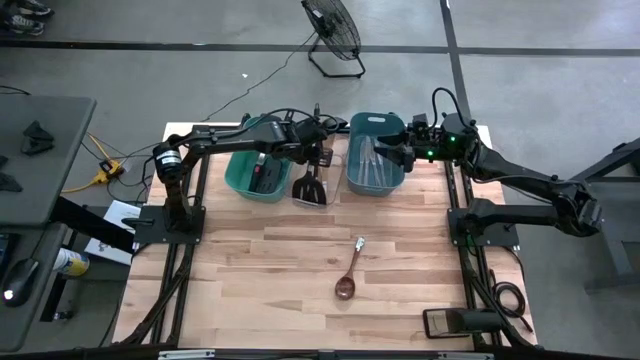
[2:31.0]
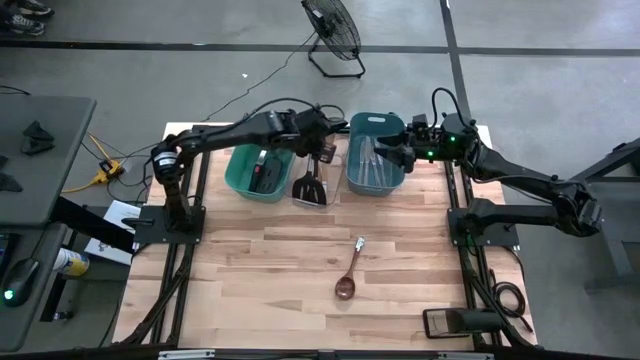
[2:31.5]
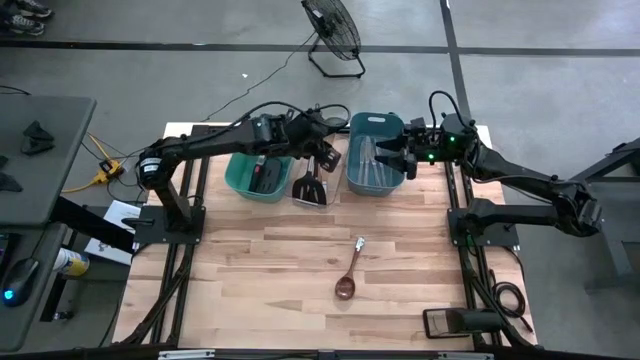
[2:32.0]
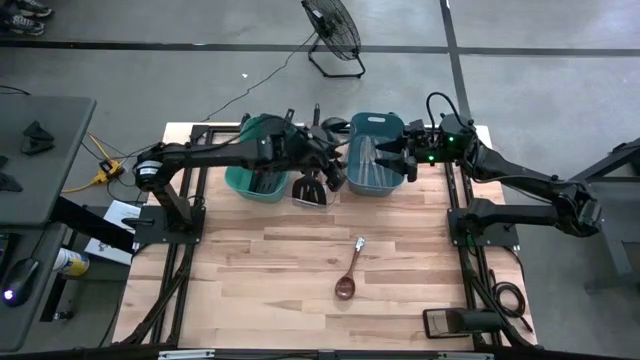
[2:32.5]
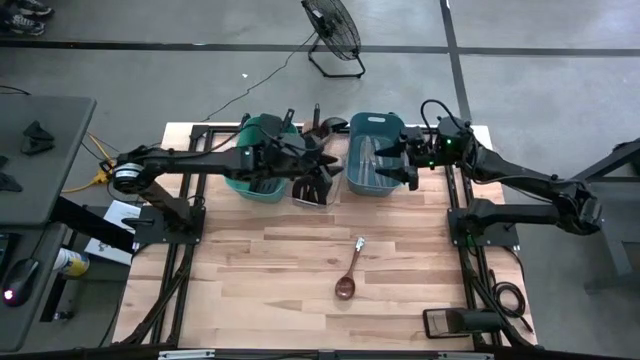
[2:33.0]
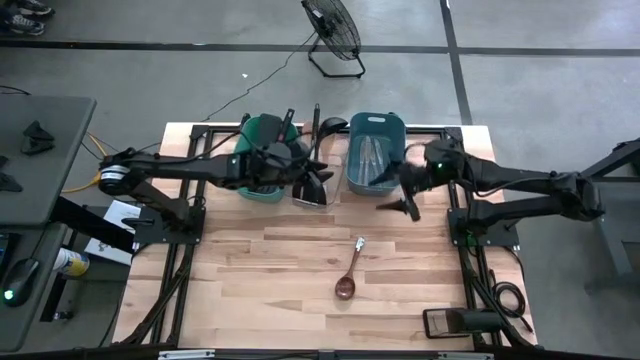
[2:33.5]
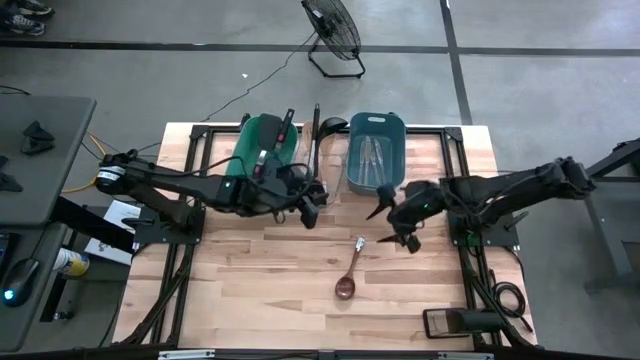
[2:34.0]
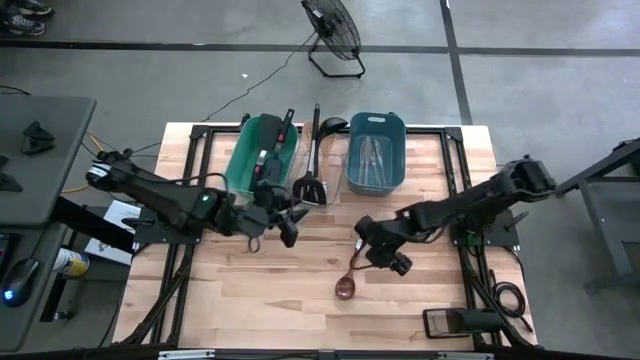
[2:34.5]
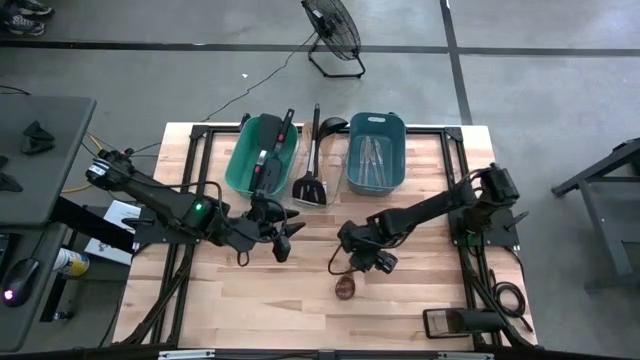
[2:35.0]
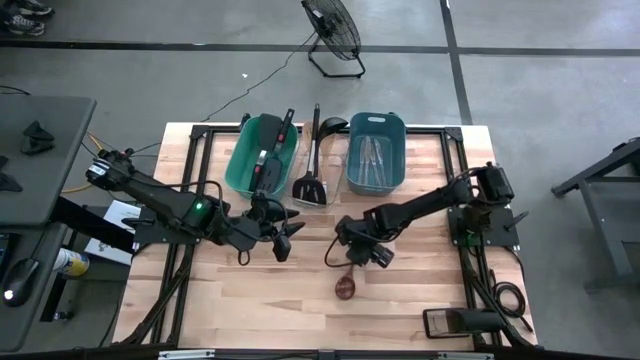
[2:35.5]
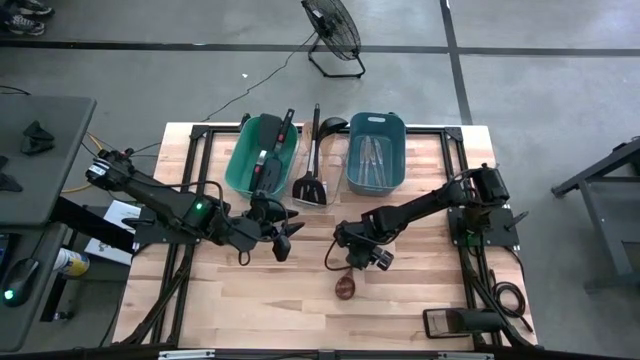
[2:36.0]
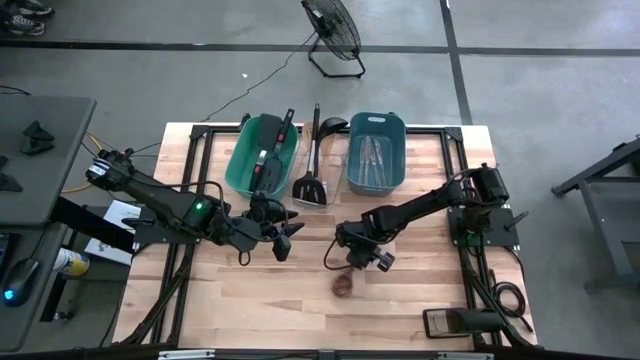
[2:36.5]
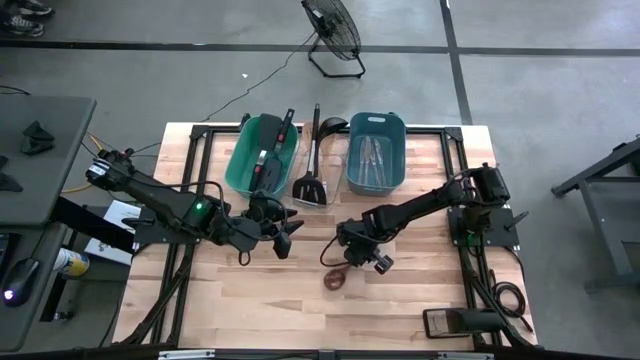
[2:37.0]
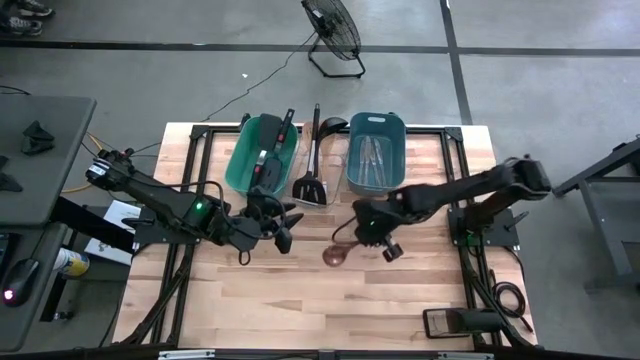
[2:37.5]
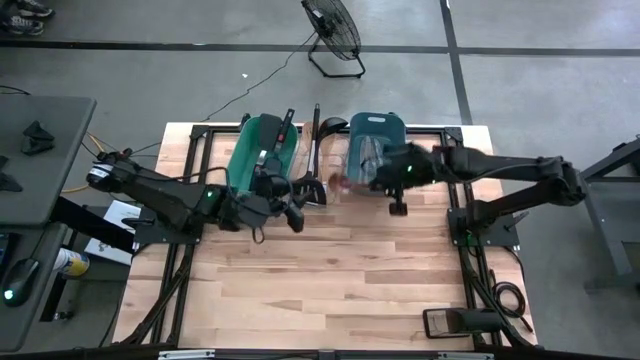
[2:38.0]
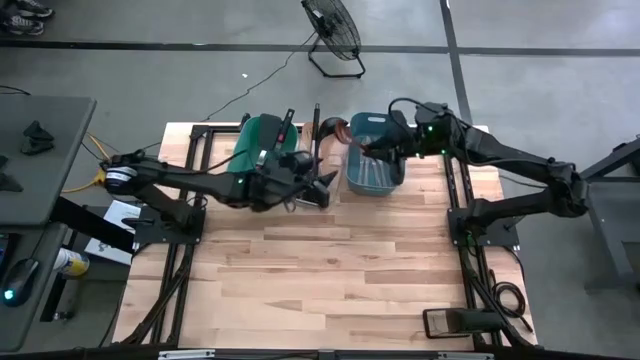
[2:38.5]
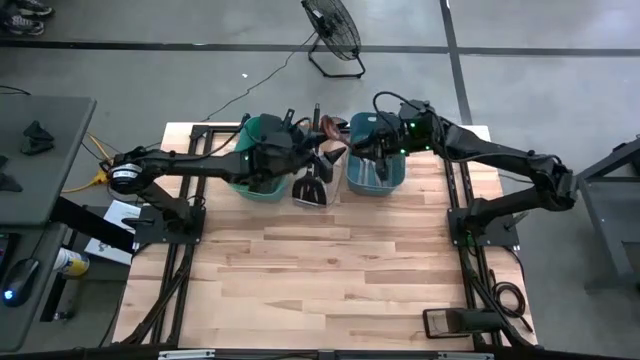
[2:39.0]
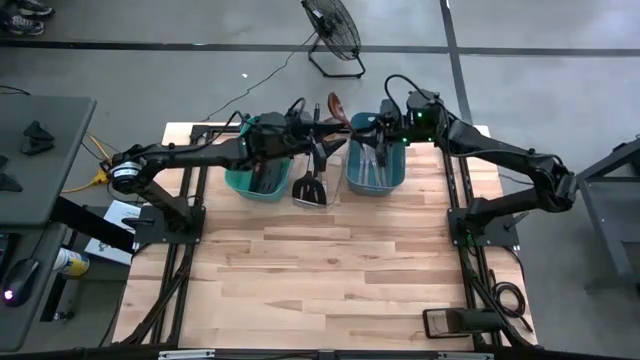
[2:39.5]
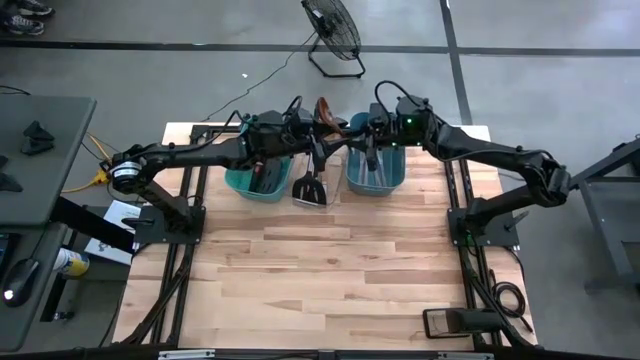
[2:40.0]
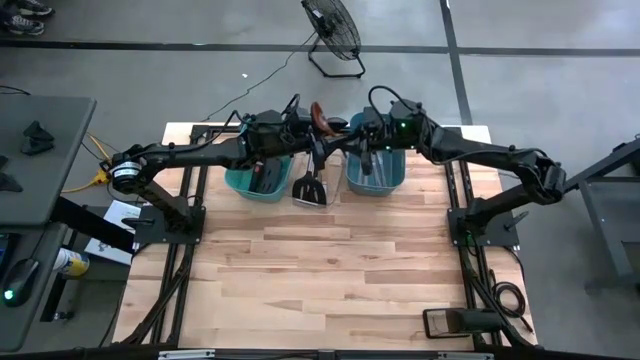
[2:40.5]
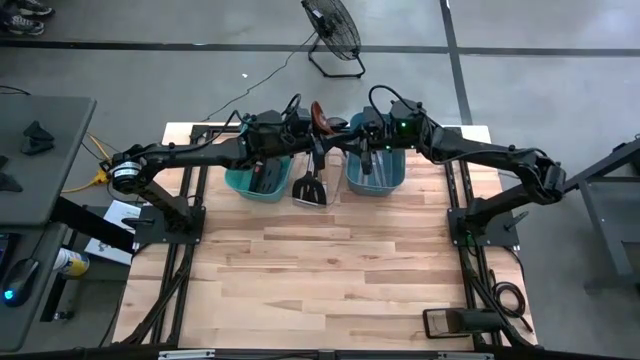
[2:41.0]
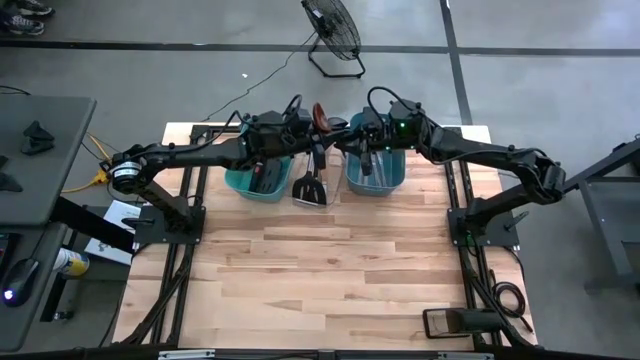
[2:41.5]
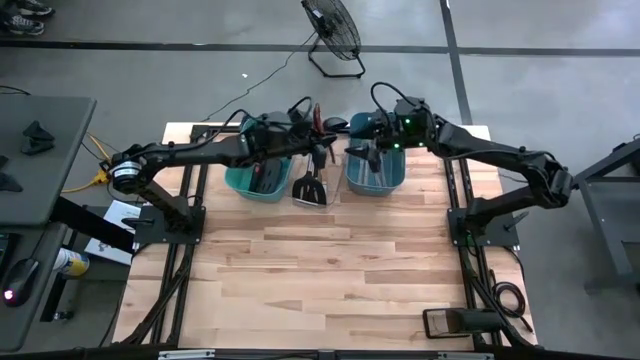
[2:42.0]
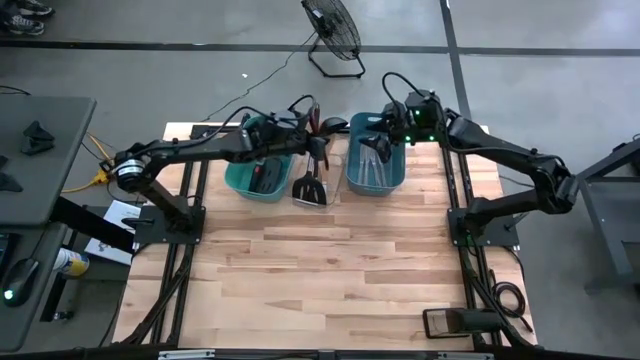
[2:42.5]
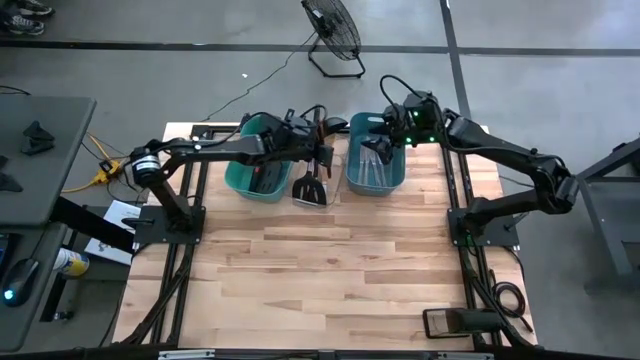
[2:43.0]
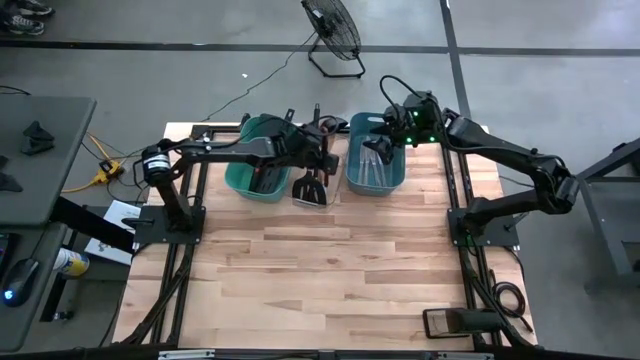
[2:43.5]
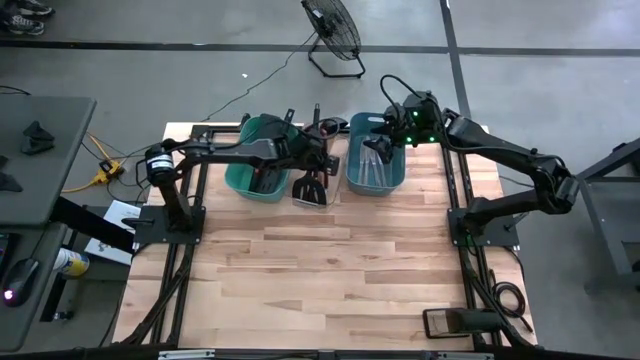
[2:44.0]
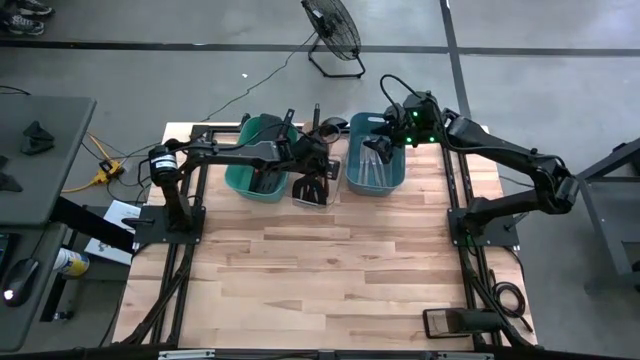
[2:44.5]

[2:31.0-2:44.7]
Task: Pick & Place Kitchen Items
Put the brown serving spoon into the transparent bin

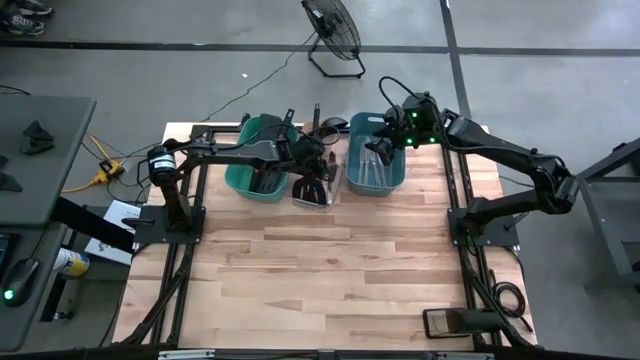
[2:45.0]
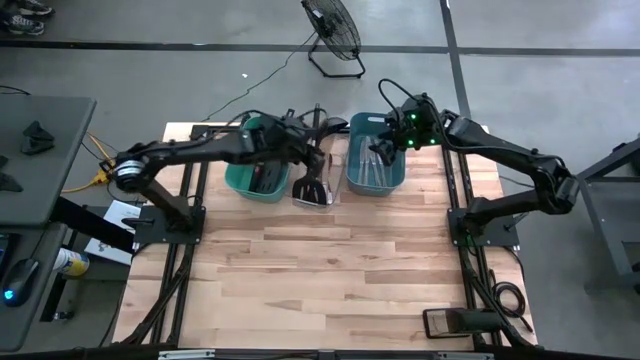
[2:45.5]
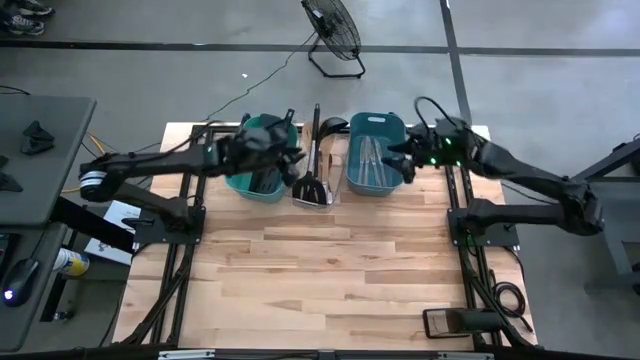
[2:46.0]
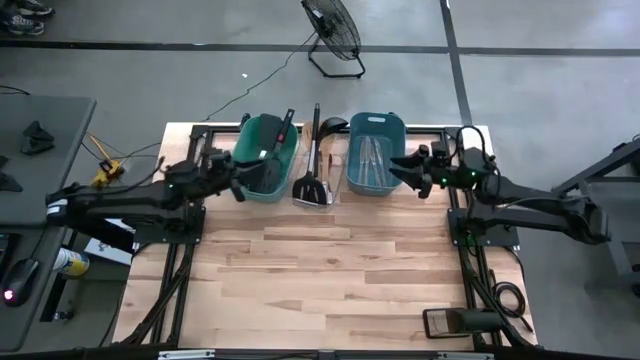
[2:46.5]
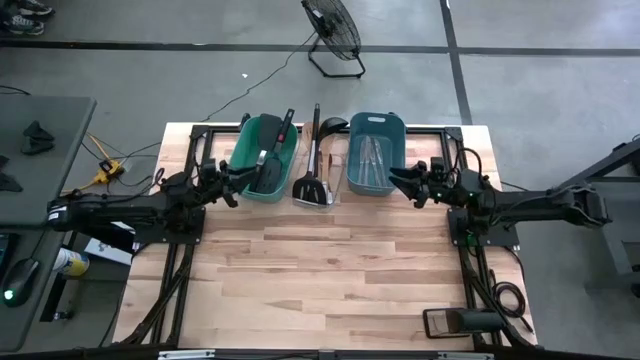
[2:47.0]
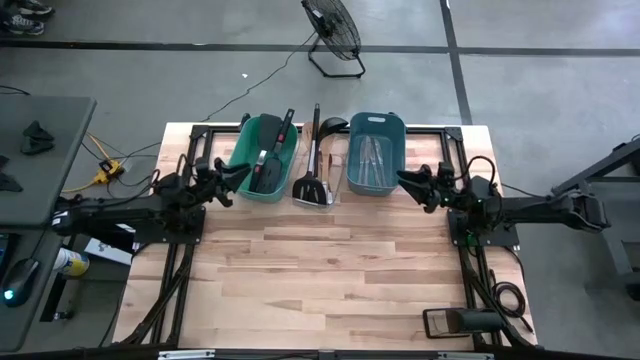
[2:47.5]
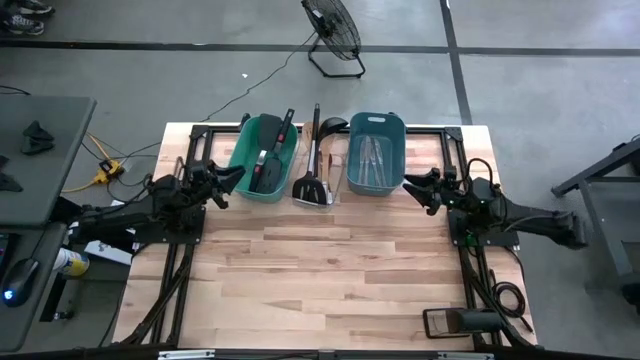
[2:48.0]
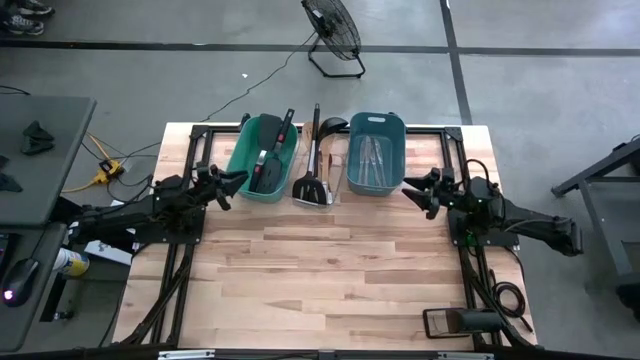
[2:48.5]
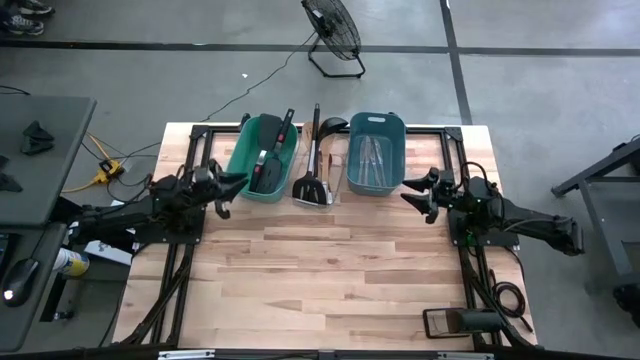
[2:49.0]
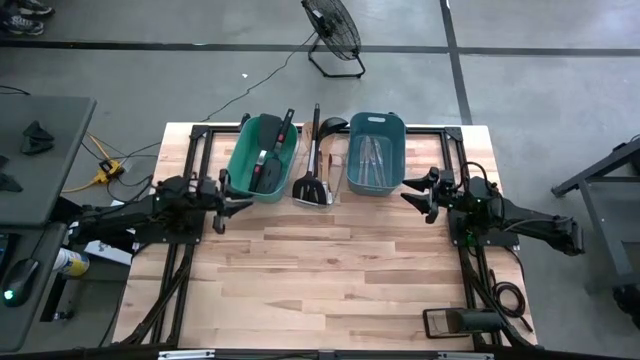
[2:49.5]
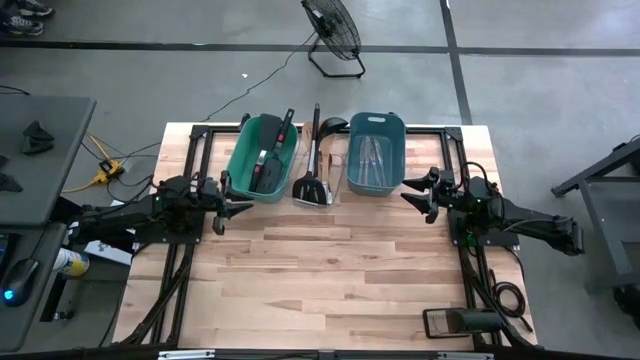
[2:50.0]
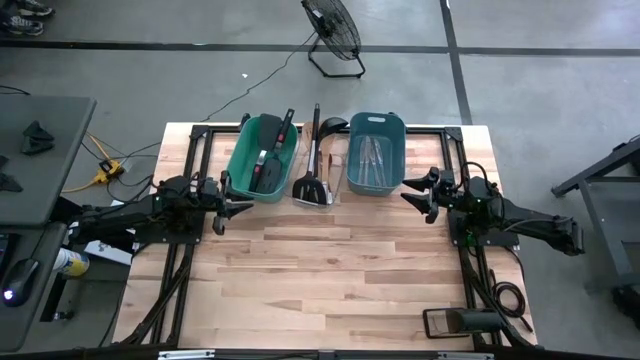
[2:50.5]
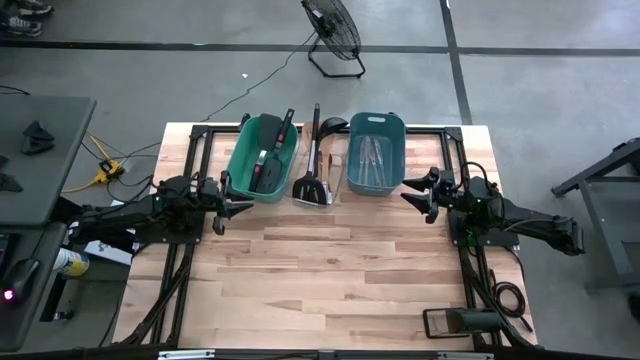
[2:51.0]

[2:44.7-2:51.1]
Return to Home Position
